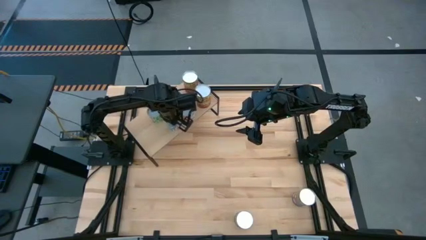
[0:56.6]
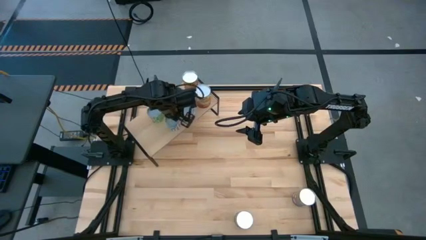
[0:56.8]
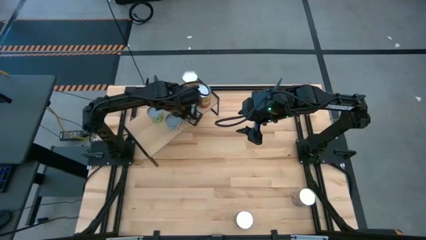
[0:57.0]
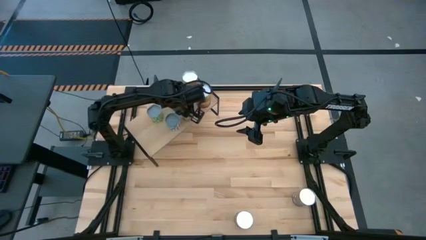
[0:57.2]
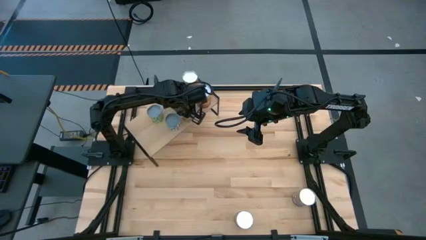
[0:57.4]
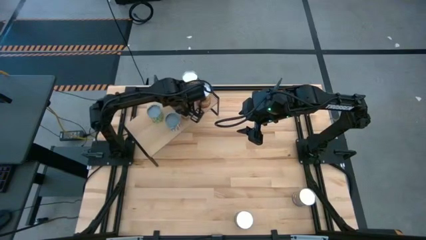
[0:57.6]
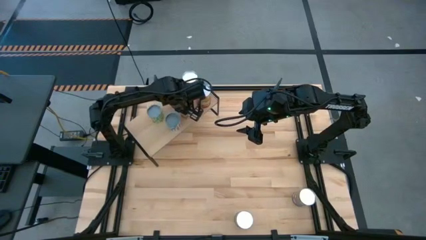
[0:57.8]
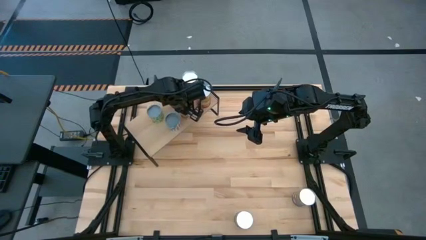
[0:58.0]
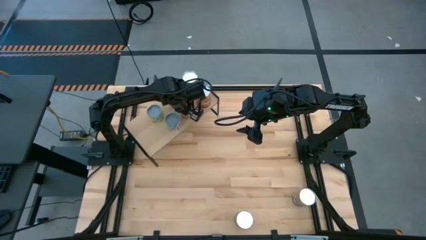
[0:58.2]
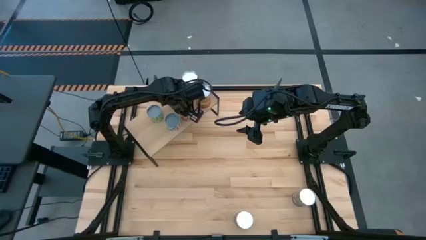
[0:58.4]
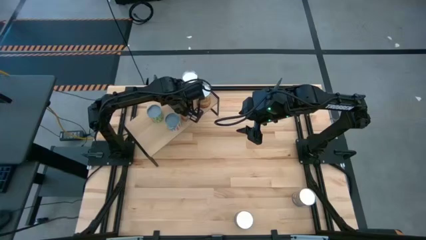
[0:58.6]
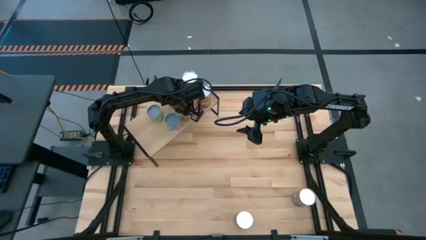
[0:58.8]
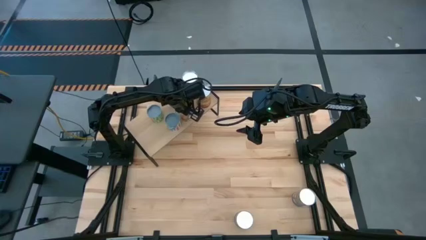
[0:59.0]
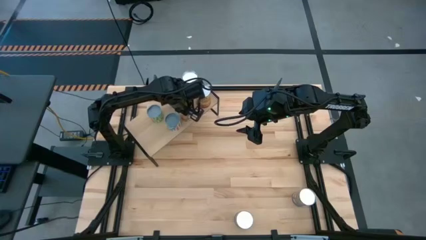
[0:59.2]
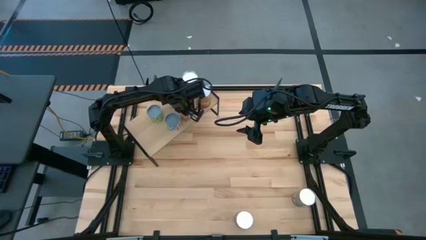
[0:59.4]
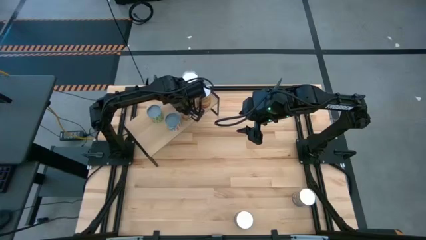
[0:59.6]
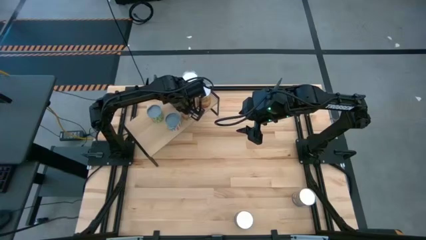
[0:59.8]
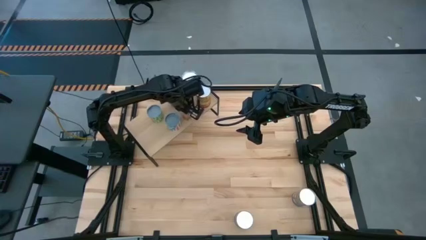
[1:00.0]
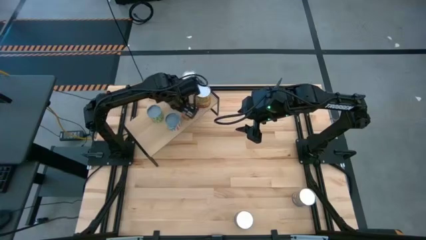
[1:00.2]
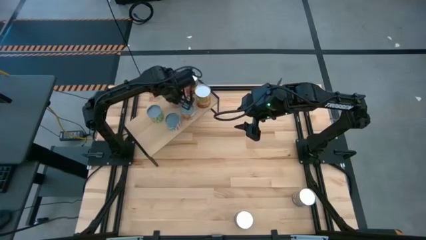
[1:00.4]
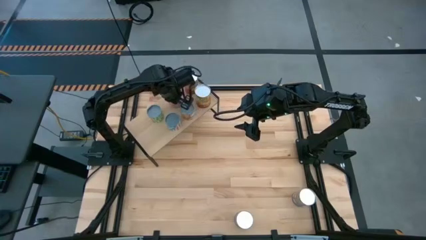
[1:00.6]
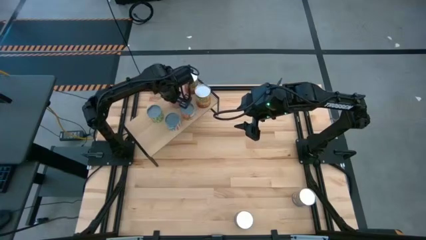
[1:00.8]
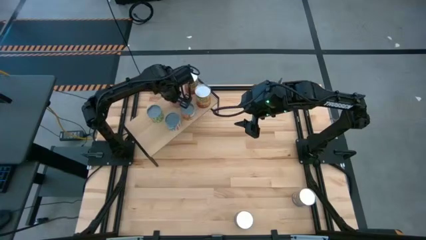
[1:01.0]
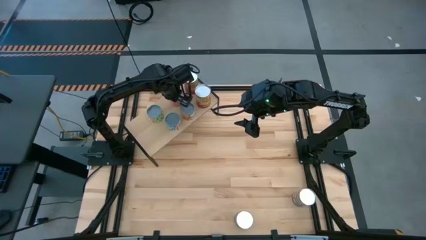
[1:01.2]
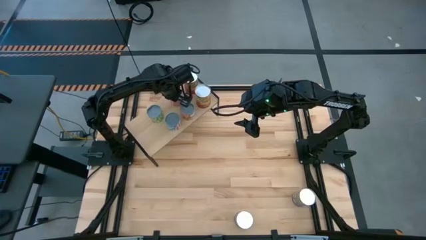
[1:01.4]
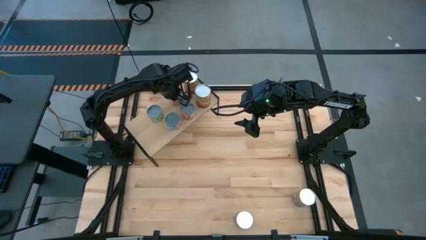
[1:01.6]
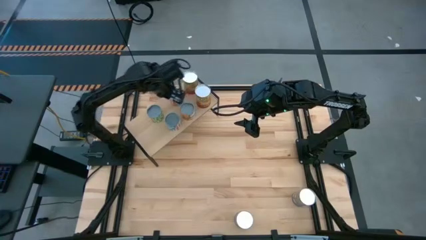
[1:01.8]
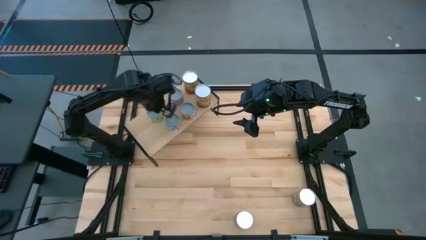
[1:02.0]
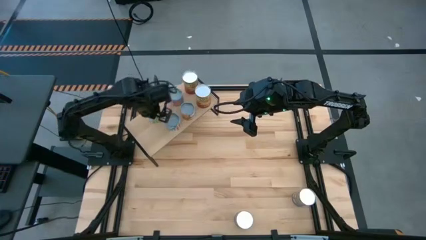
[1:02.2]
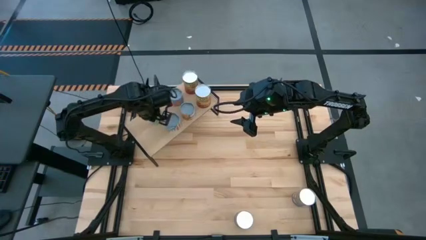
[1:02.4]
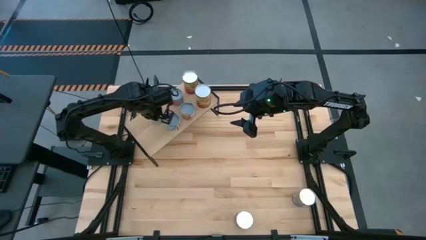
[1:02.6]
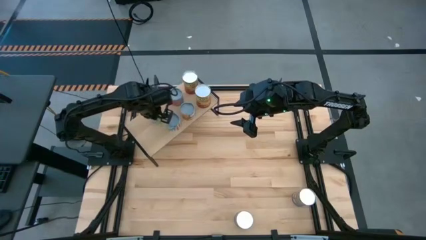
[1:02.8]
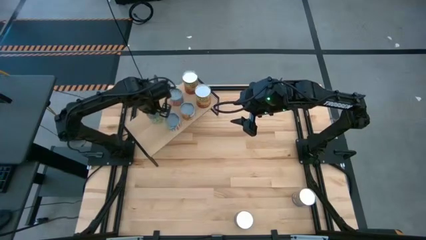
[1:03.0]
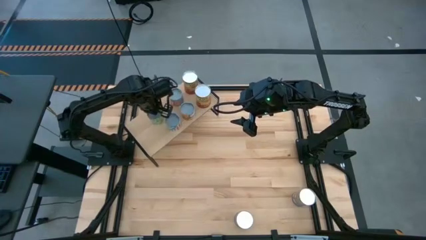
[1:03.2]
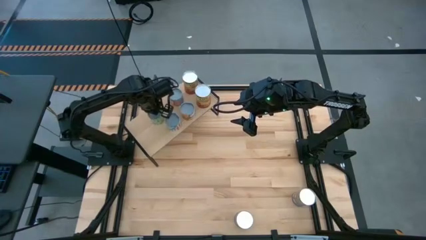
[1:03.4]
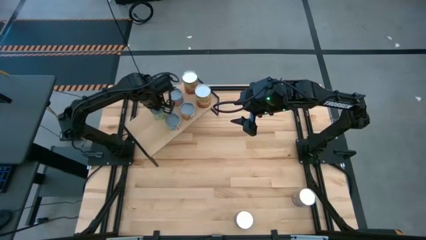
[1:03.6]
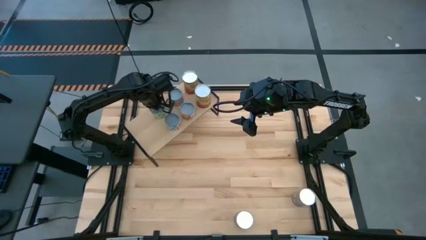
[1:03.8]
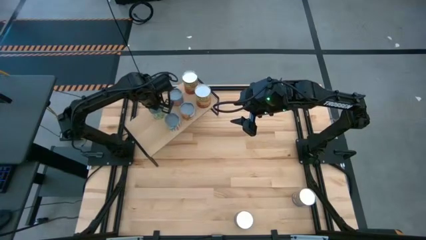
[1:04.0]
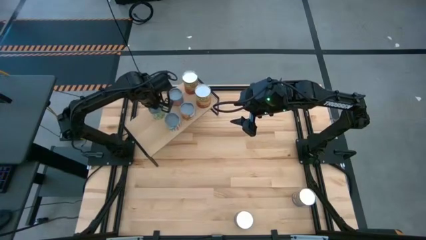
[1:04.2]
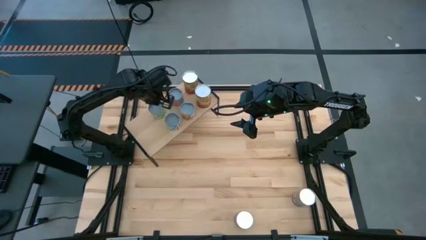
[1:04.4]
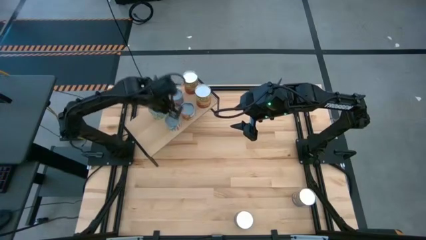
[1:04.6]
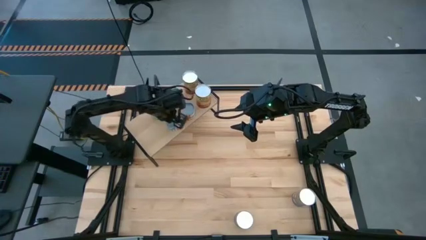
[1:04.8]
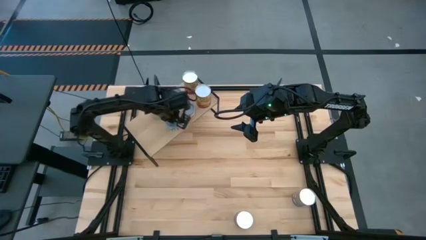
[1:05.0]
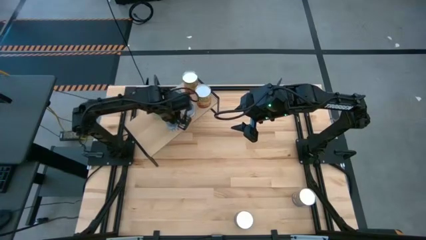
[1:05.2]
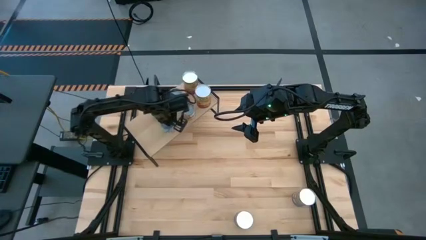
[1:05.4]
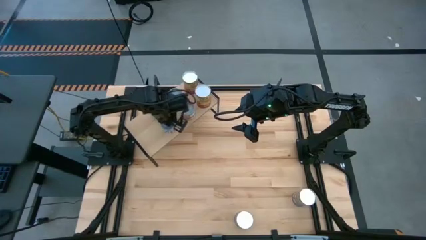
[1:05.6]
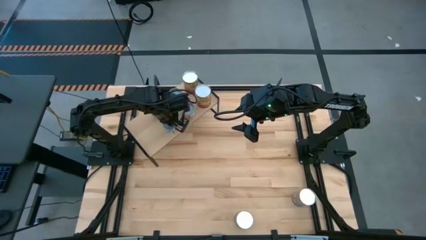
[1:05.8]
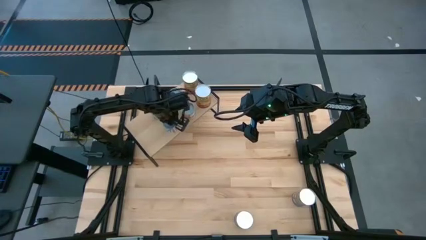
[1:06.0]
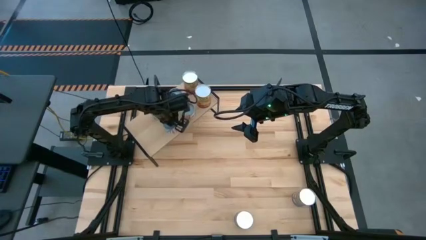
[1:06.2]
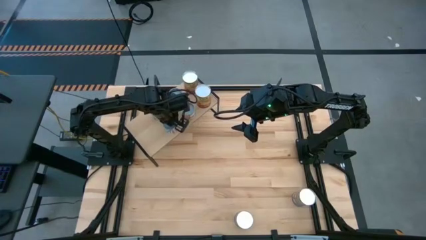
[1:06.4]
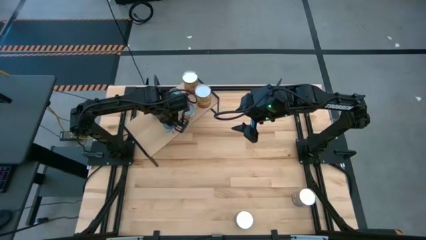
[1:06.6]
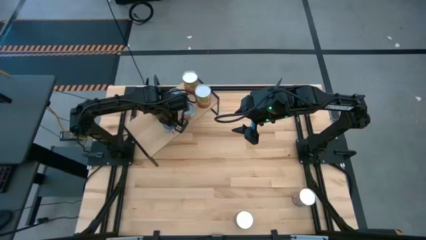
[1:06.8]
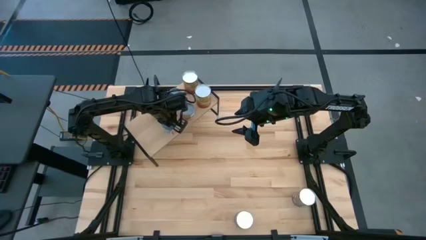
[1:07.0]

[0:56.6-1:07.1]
Task: Pick and place cans onto a shelf
Adjust the cans on the shelf

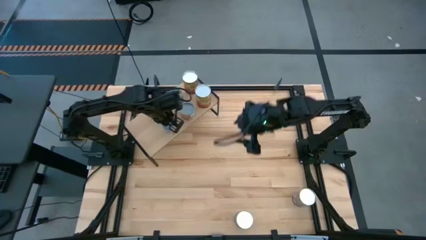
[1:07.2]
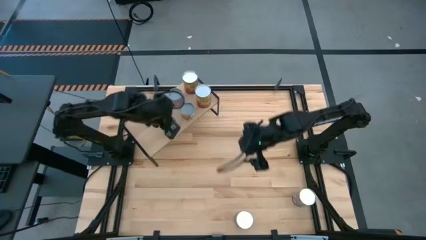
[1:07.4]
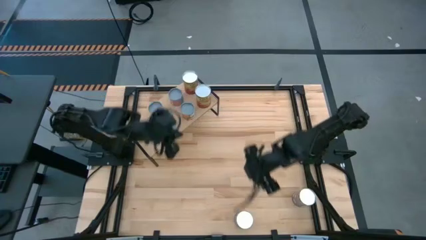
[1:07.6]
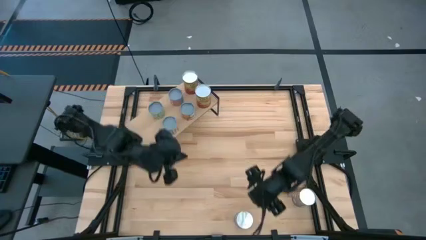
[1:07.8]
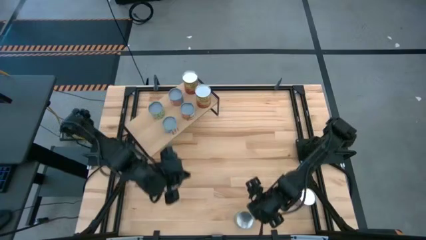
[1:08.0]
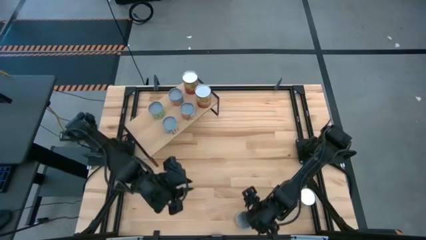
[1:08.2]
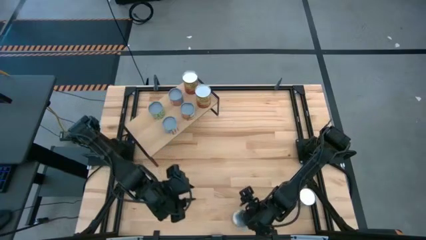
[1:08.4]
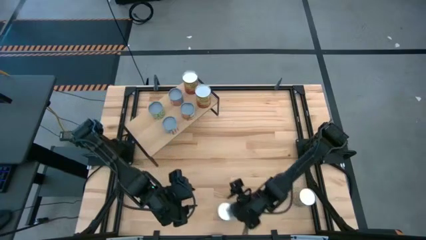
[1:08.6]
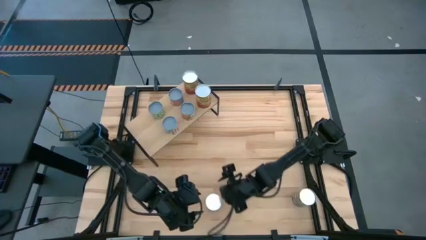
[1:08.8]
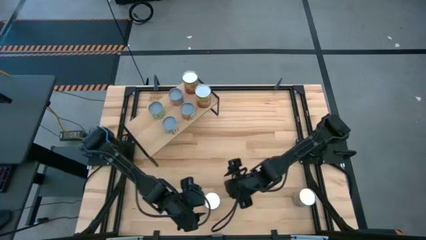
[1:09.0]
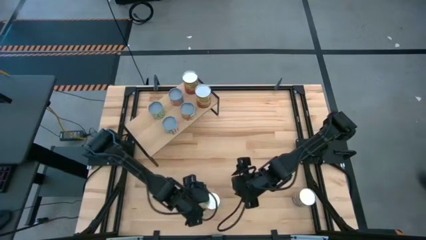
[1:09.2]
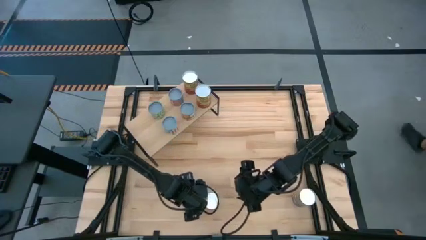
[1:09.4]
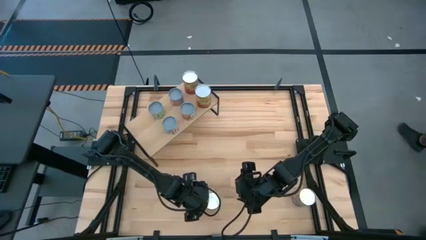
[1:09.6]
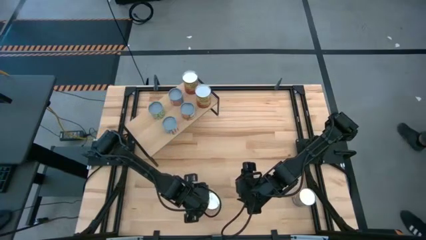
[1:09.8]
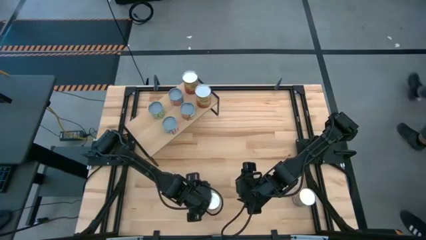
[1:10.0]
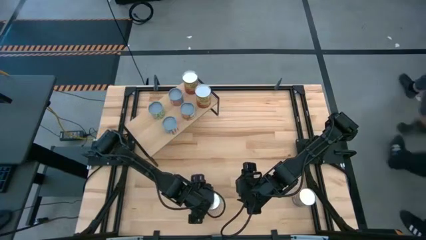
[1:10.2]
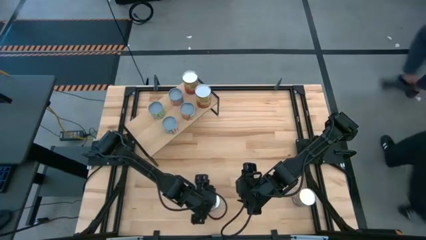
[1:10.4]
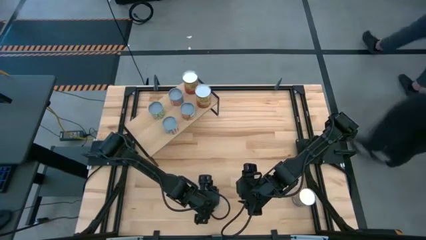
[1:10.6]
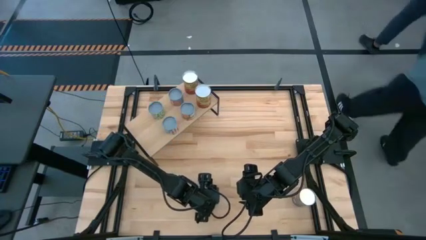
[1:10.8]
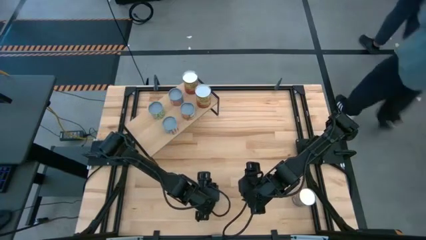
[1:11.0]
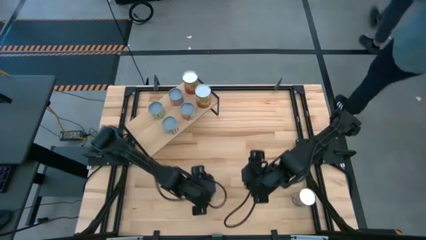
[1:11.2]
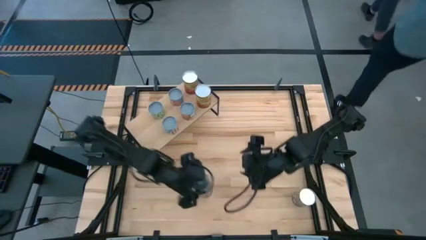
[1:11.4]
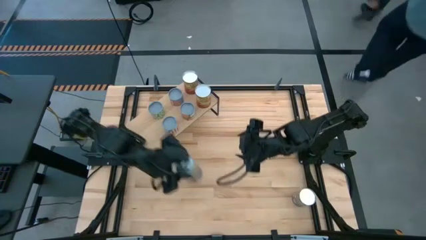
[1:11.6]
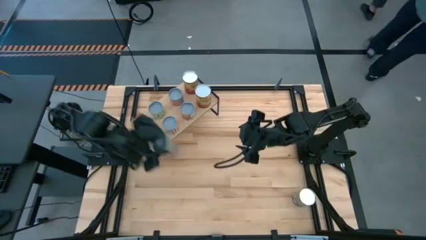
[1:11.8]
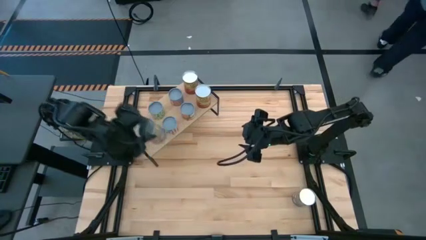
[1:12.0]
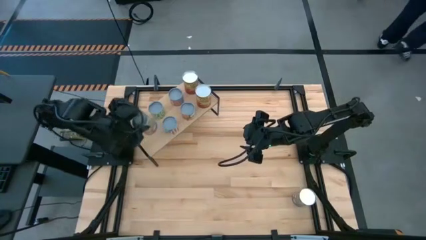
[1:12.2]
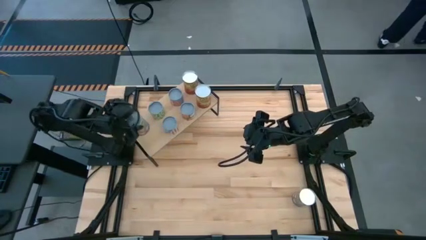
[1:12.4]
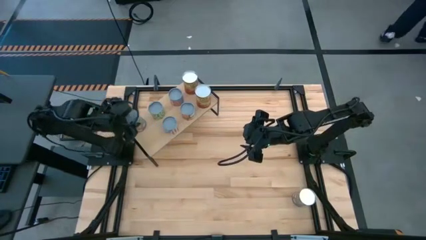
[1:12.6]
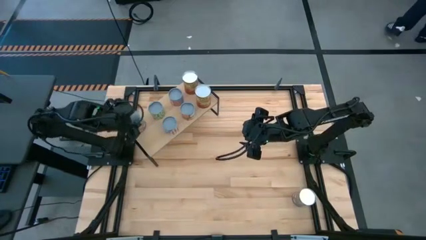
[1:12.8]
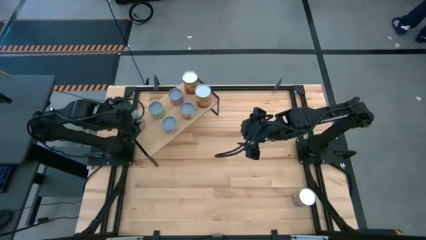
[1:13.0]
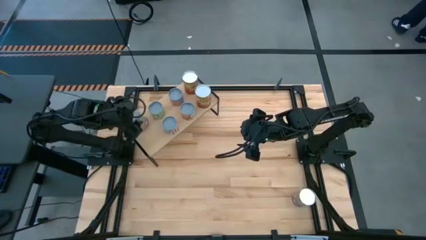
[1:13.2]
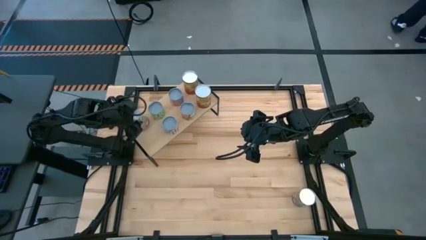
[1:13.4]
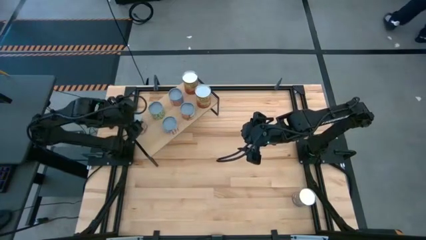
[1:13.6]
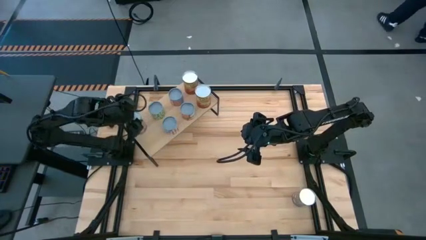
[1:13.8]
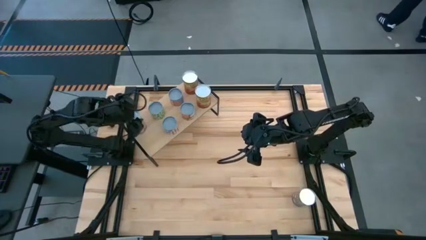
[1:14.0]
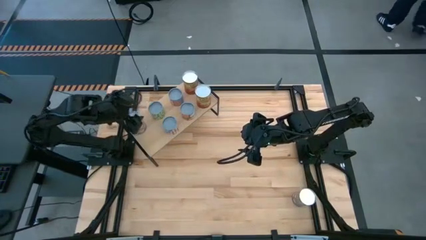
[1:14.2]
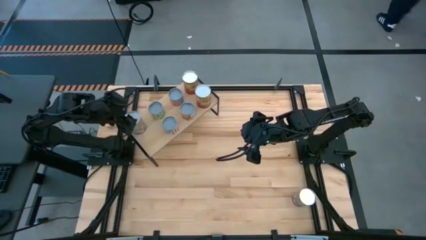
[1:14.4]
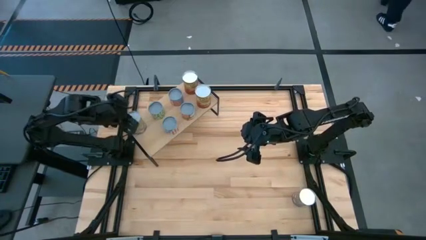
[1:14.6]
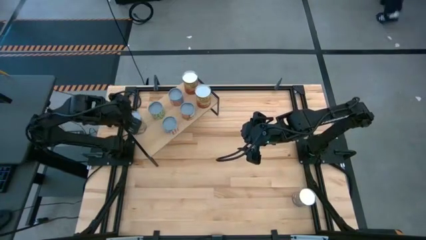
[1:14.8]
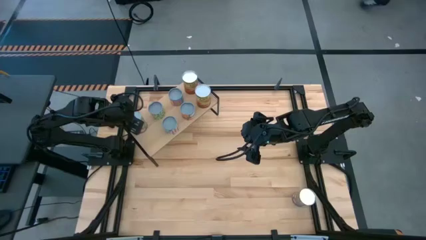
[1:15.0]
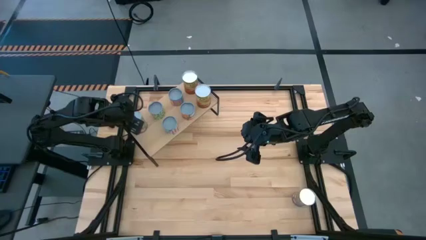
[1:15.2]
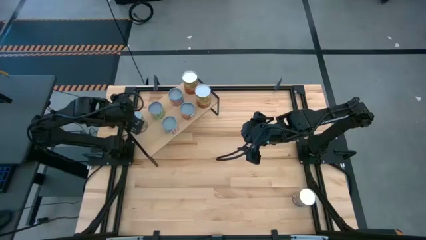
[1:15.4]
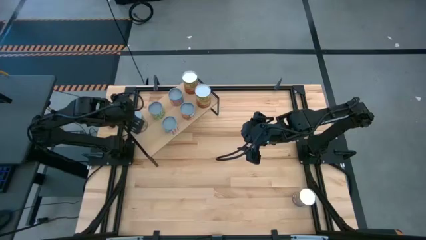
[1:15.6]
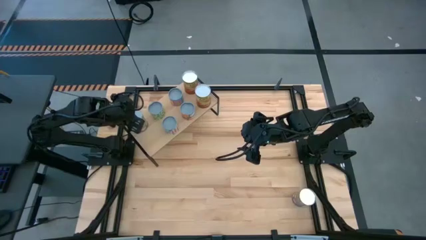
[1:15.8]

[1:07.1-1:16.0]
Put the left canned peaches on the shelf
